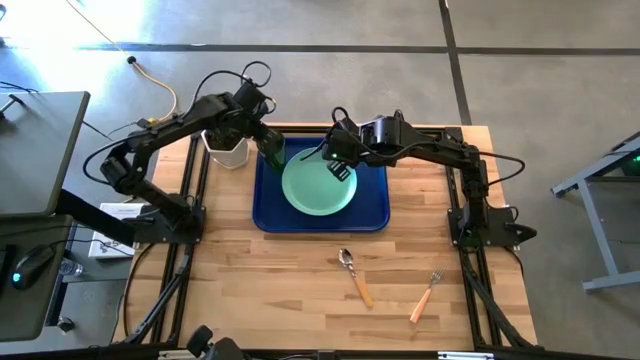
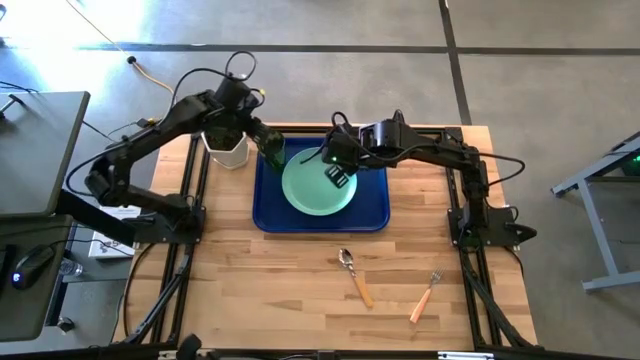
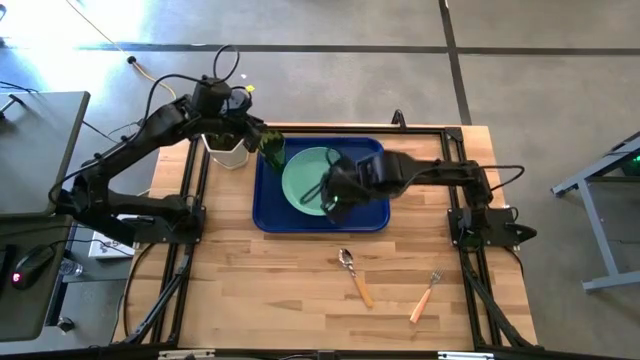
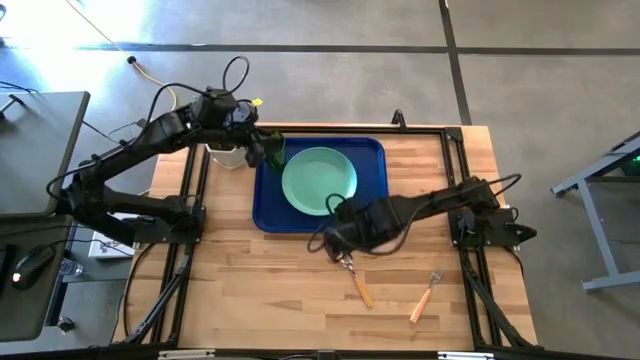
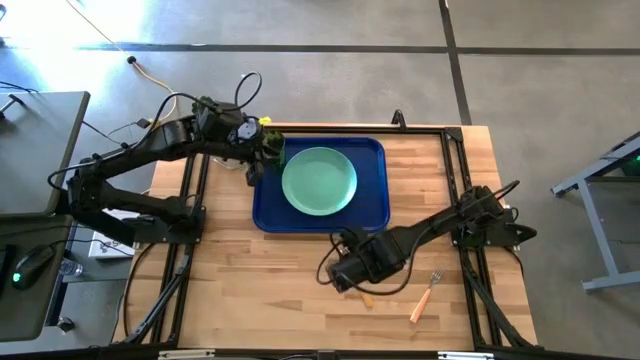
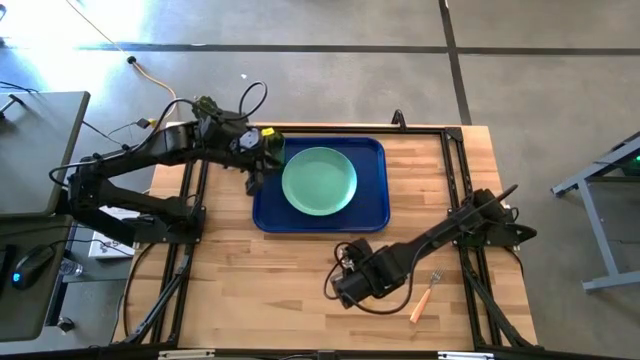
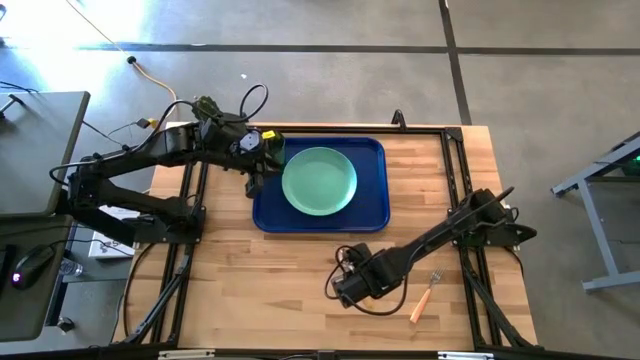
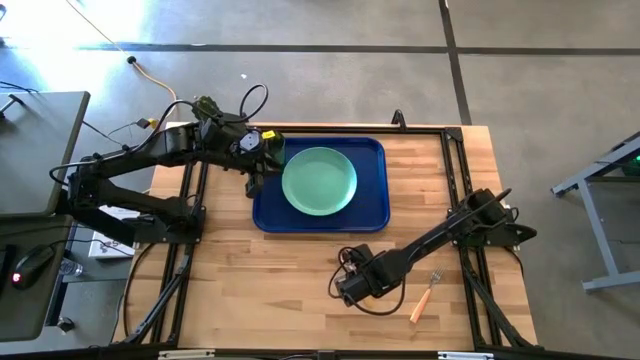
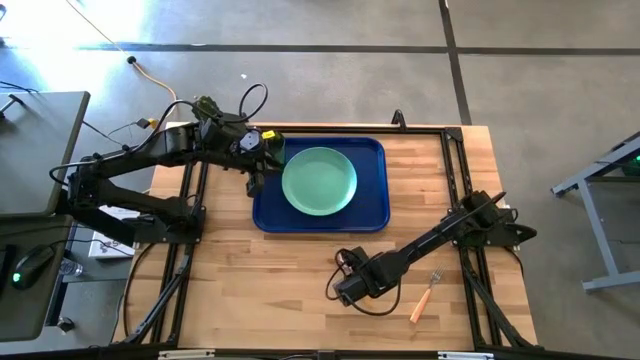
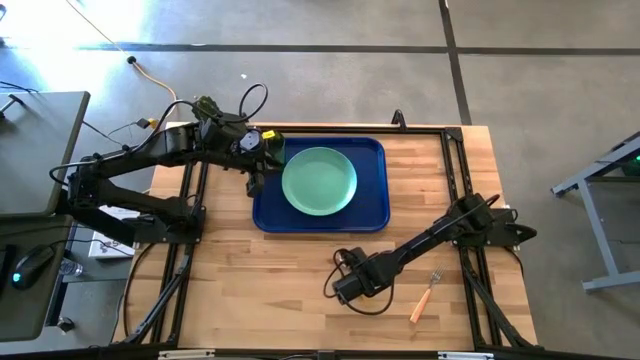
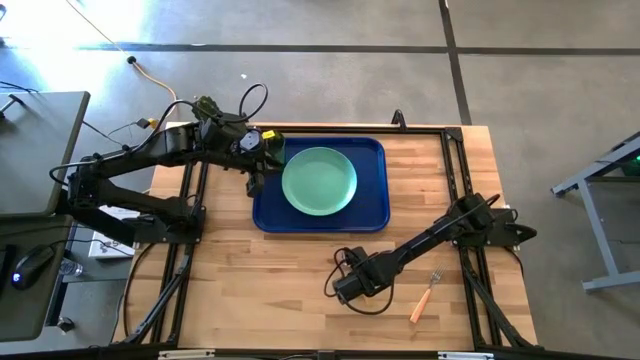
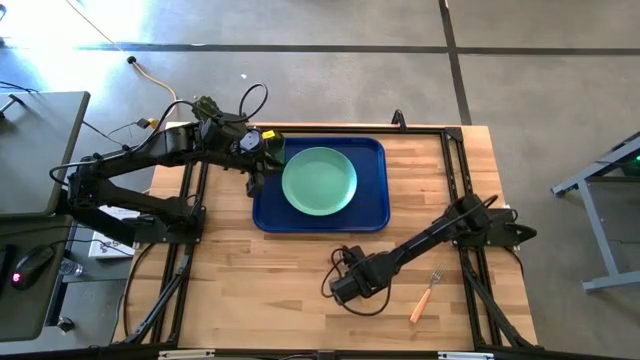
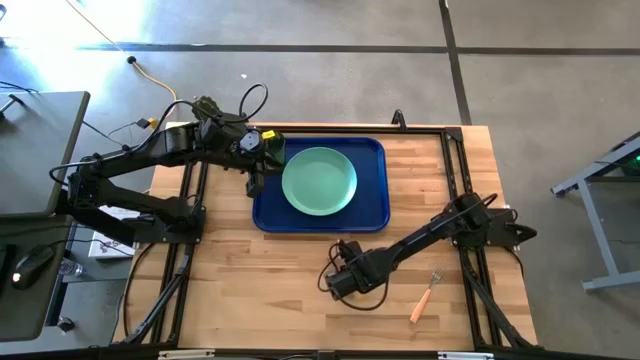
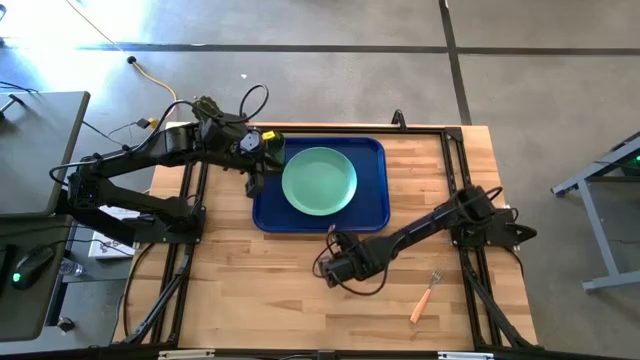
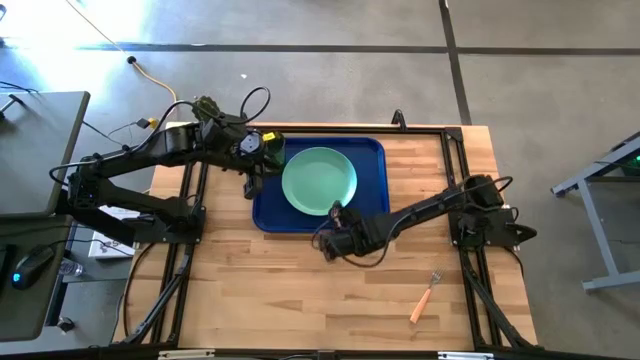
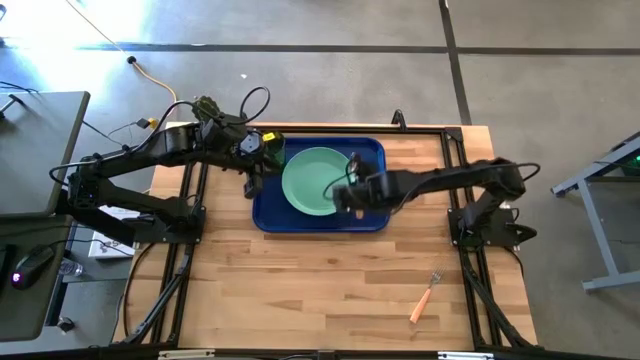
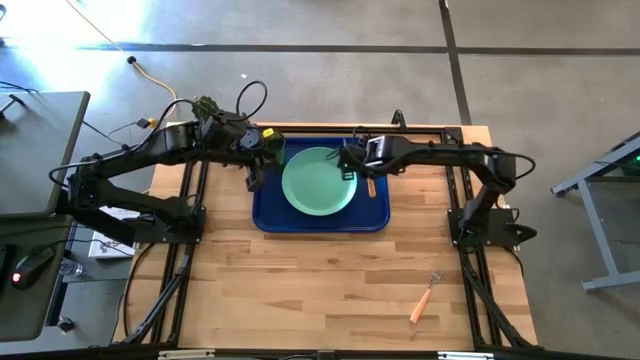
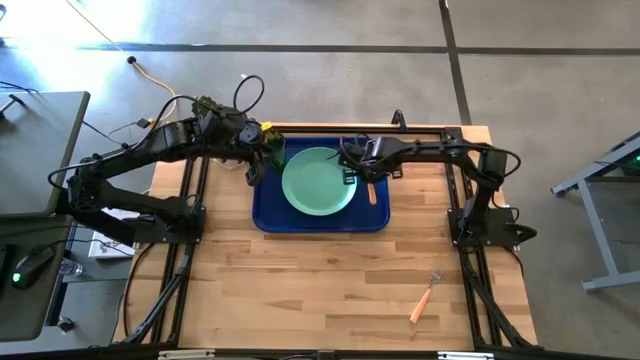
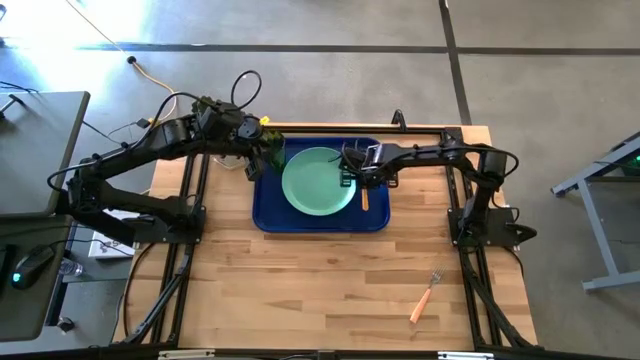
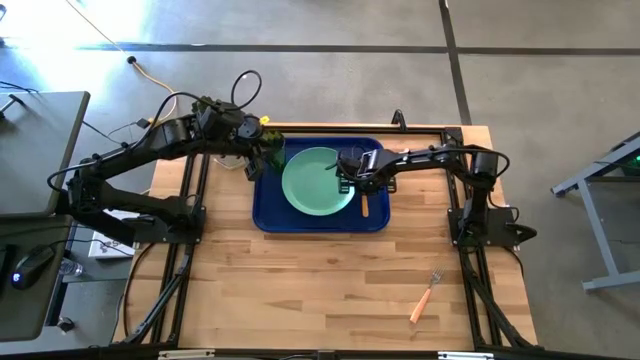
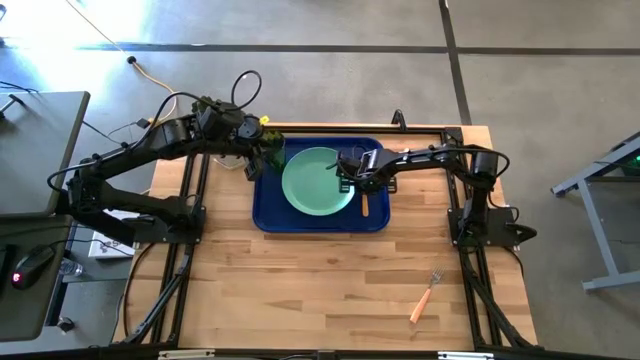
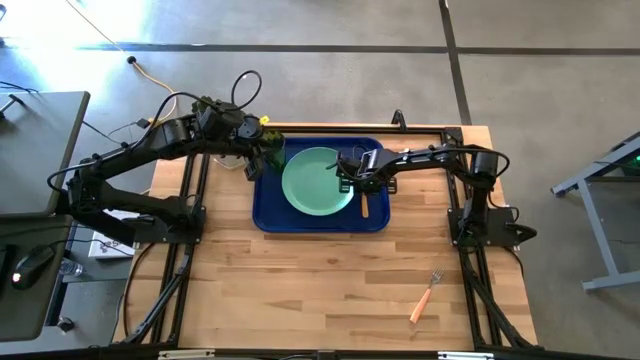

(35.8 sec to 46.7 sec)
Task: Pick and place plate/cup/fork/spoon on tray
Put the yellow spoon to the right of the green plate on the blue tray

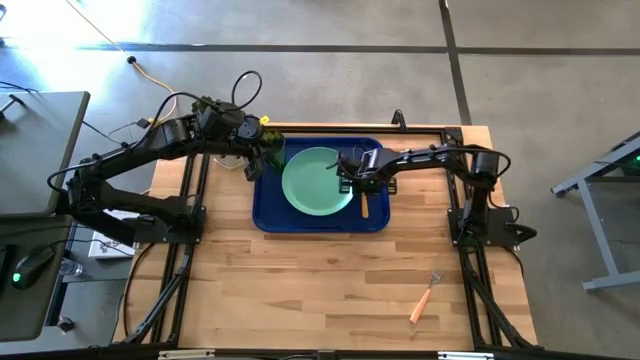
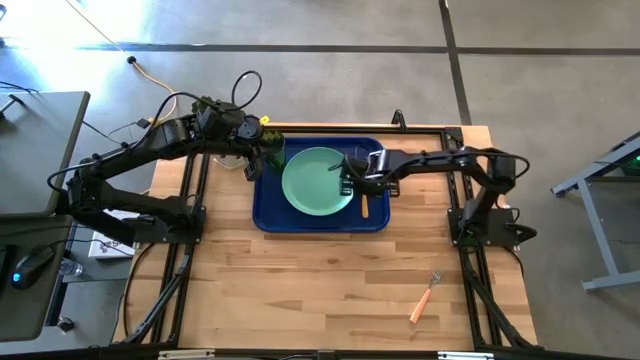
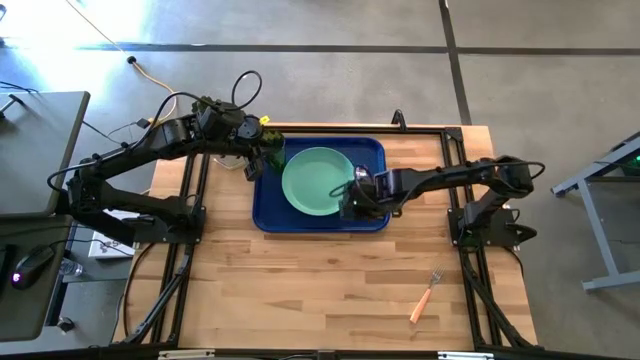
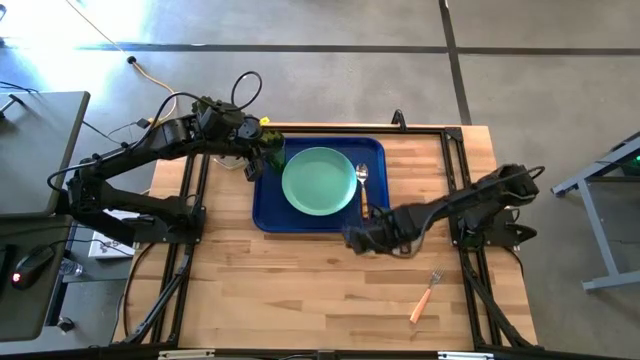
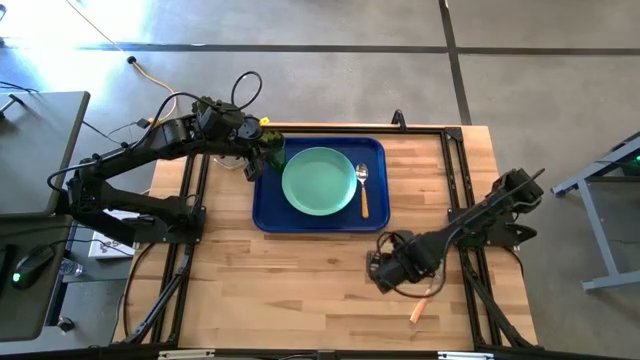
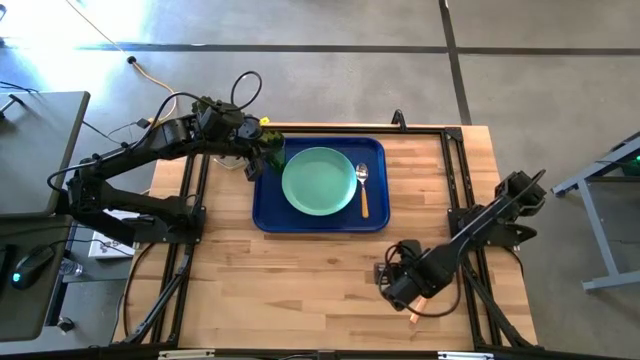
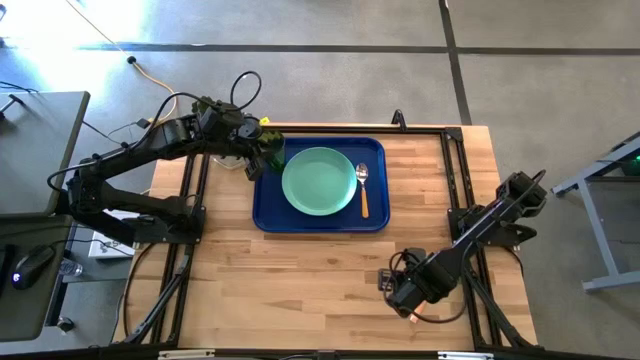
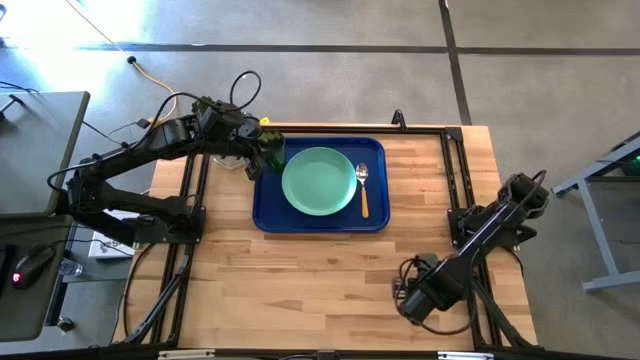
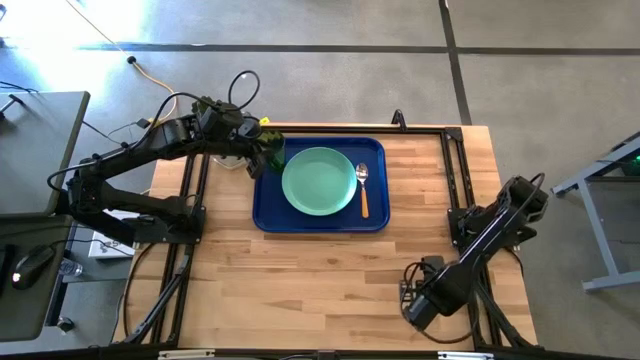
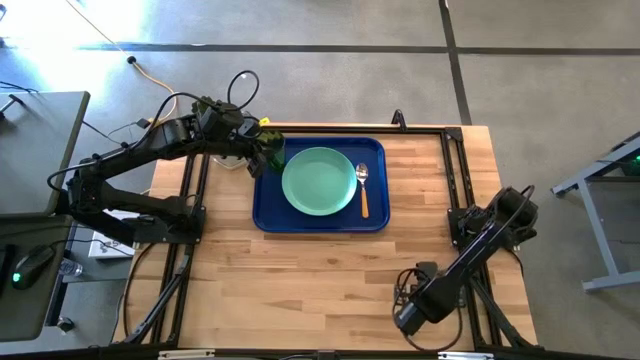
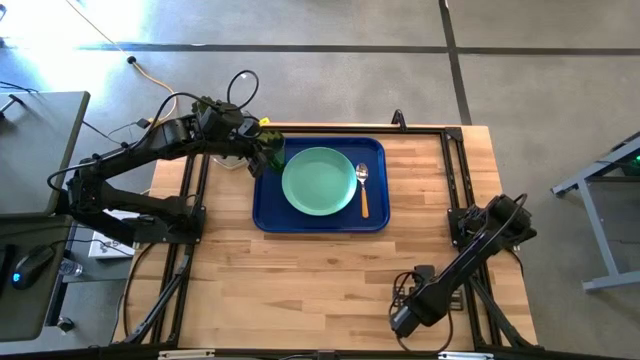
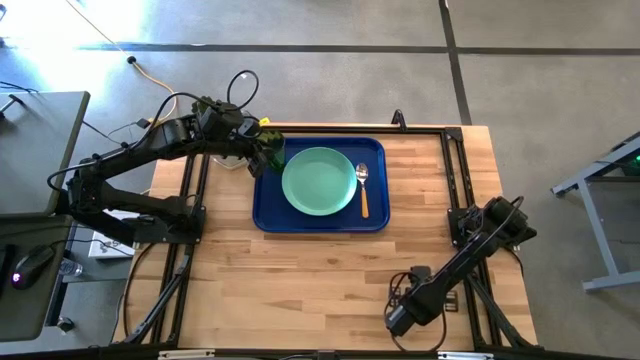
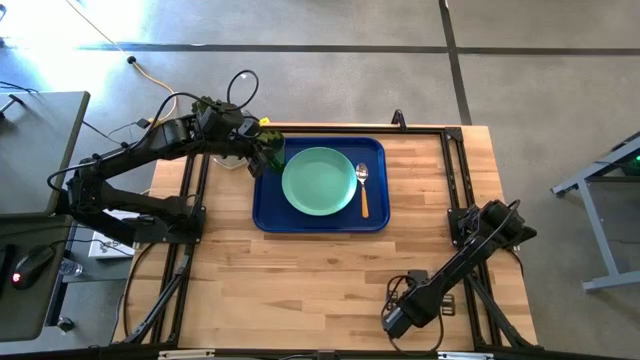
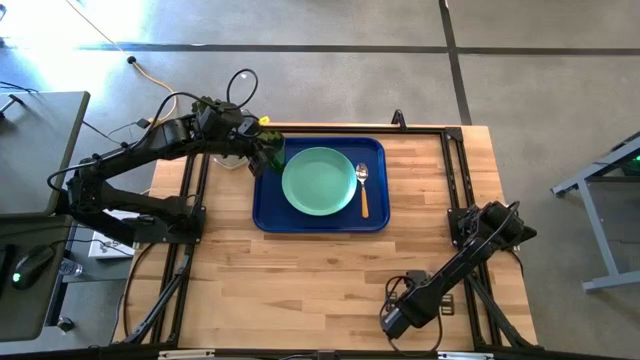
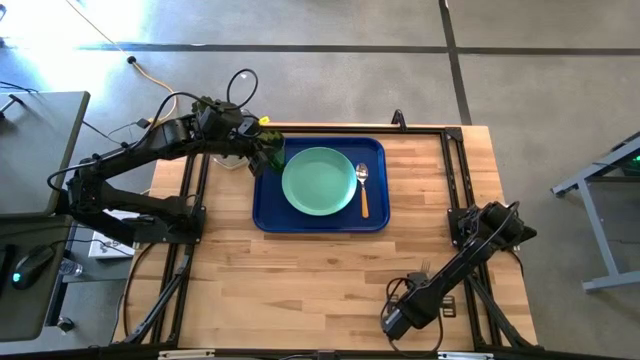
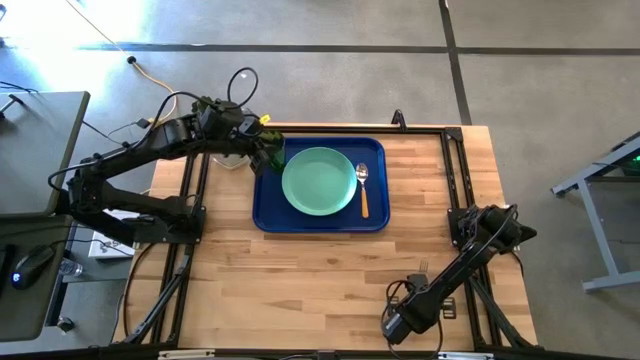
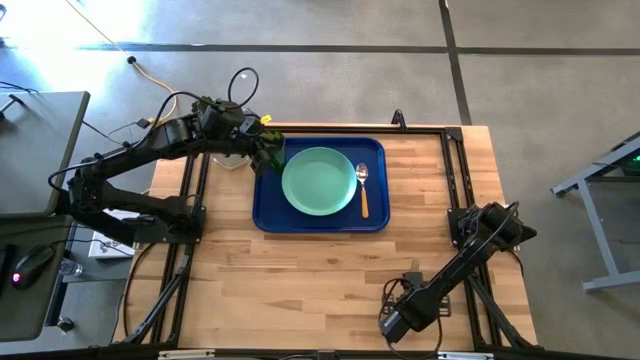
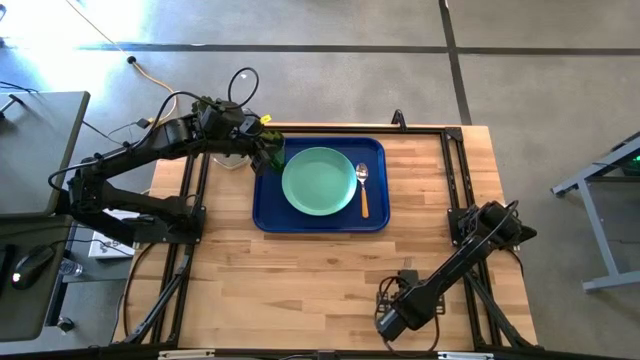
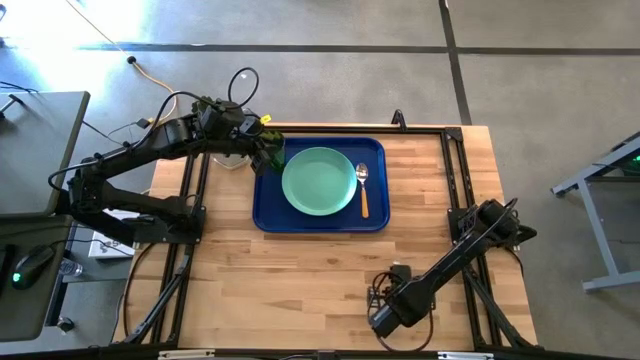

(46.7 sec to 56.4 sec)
Put the light brown fork to the right of the yellow spoon on the blue tray

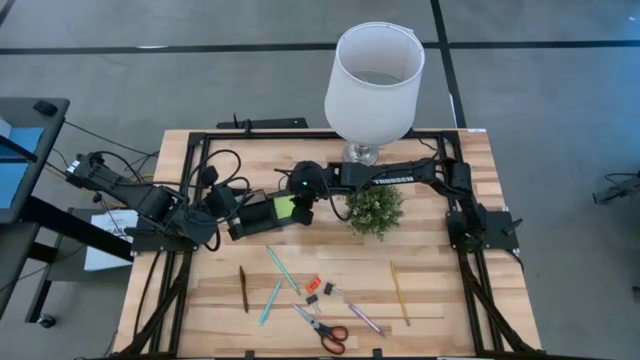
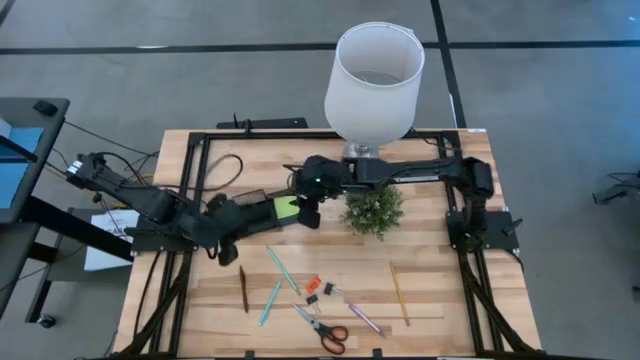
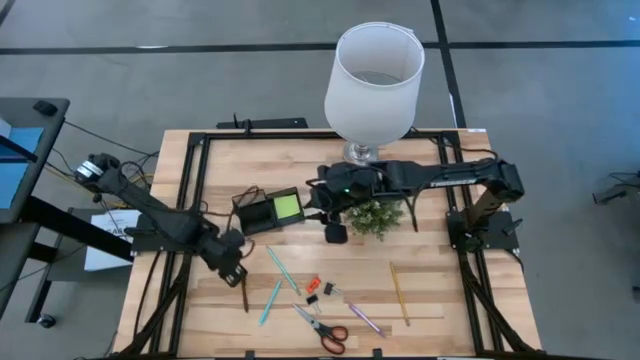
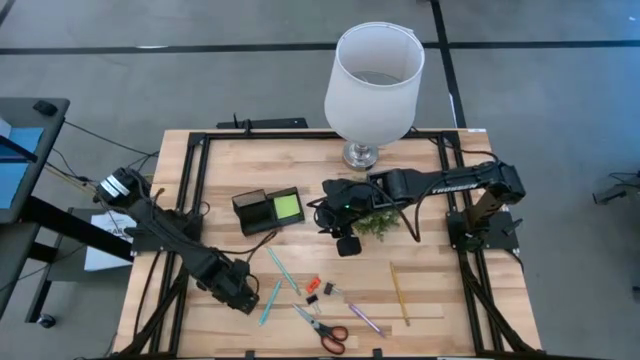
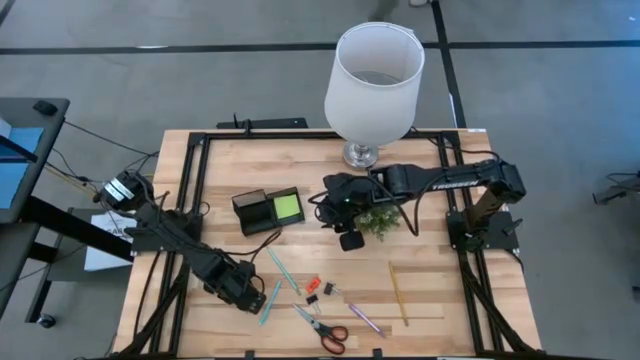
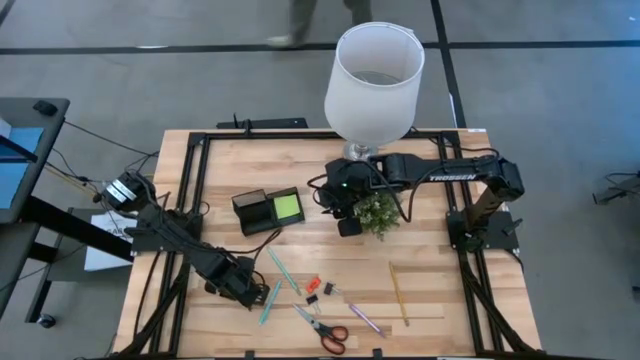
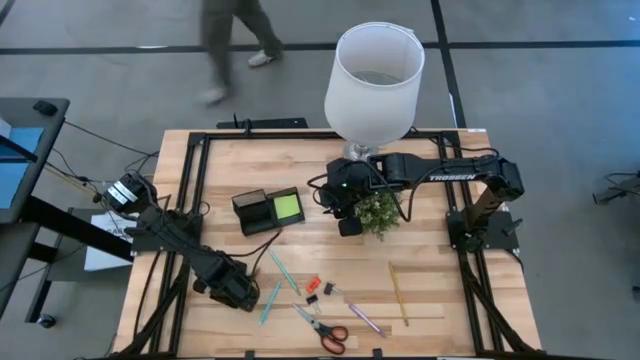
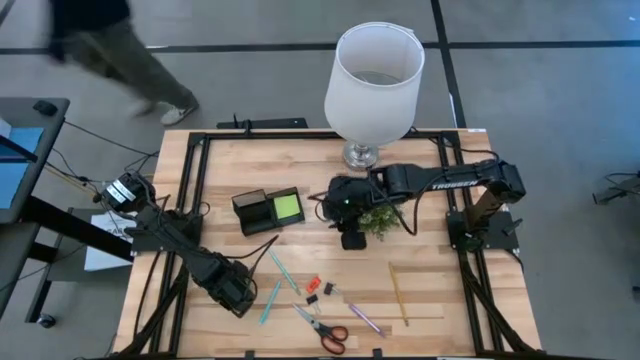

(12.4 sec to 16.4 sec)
Task: Pick and place office supplies into organizer
Put the brown pen into the black desk organizer
